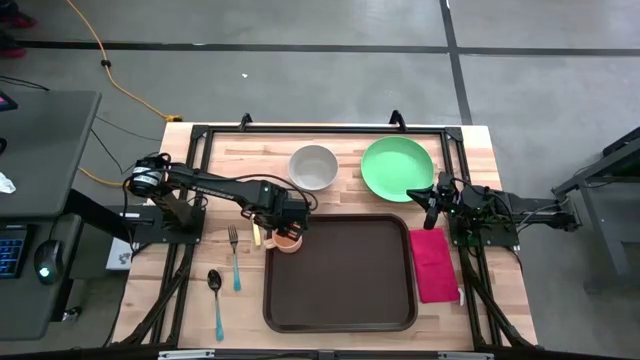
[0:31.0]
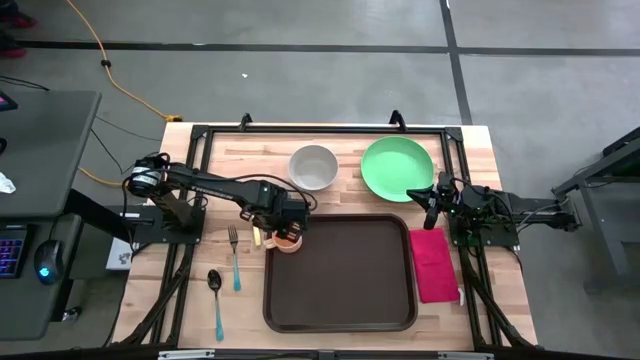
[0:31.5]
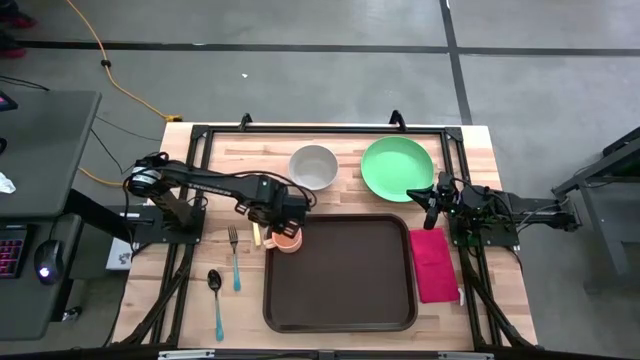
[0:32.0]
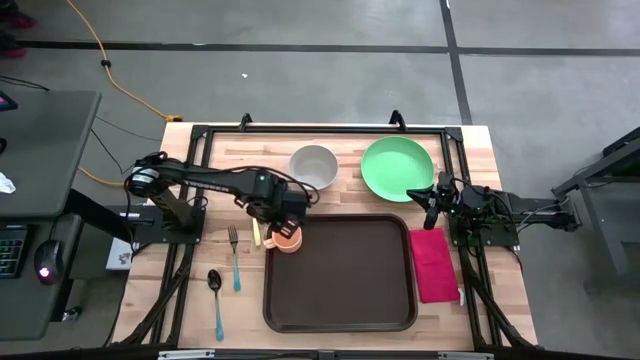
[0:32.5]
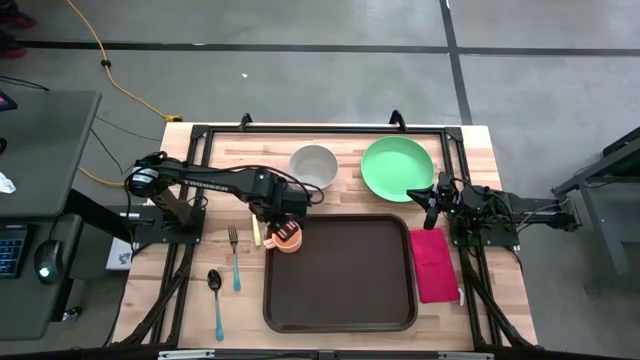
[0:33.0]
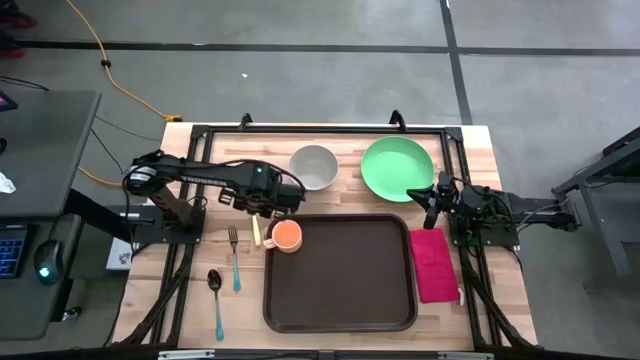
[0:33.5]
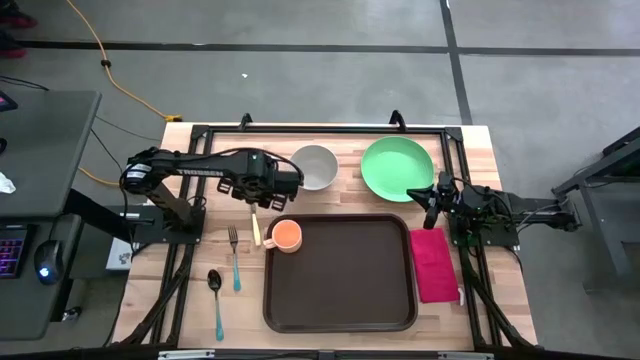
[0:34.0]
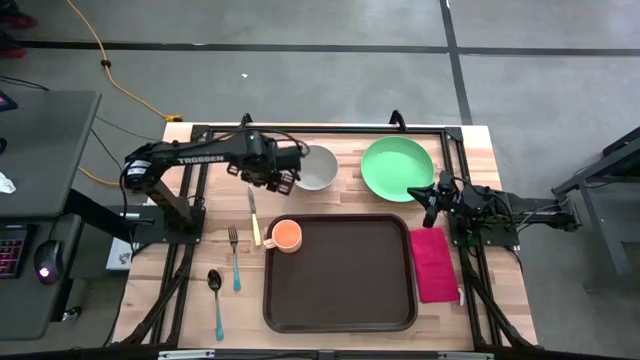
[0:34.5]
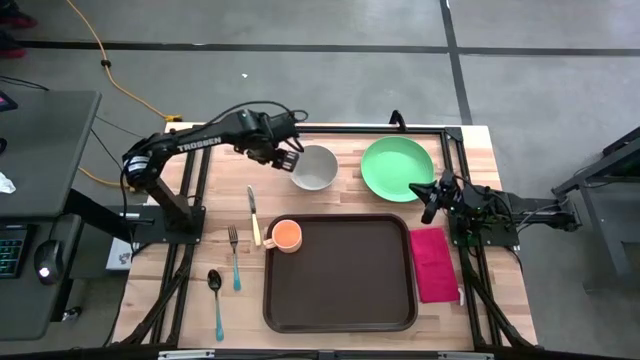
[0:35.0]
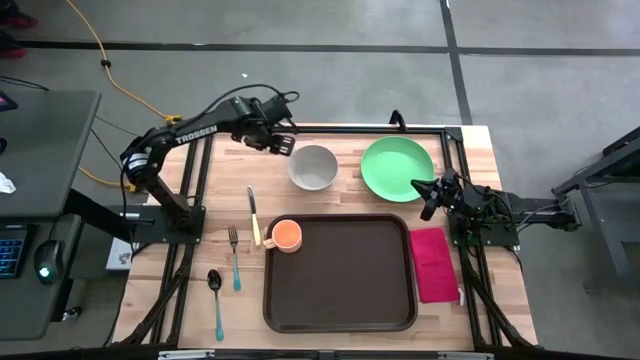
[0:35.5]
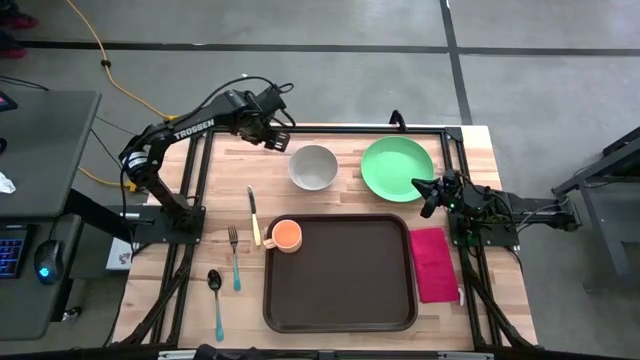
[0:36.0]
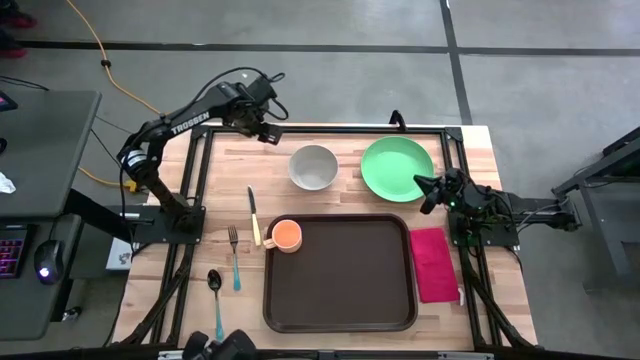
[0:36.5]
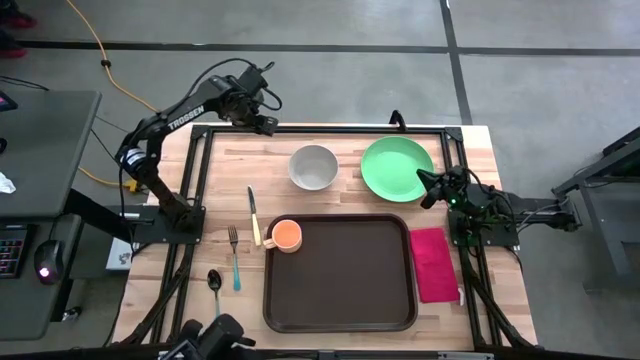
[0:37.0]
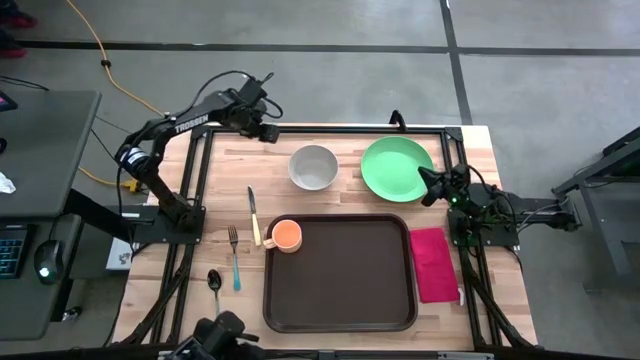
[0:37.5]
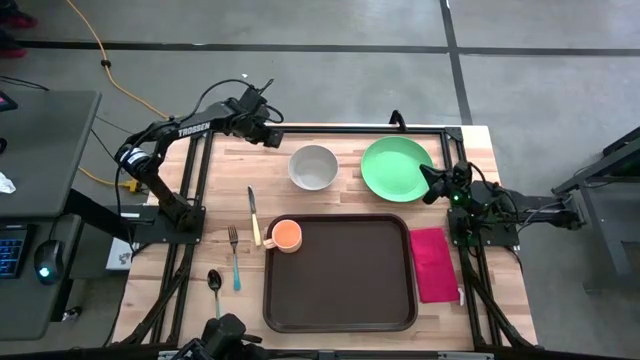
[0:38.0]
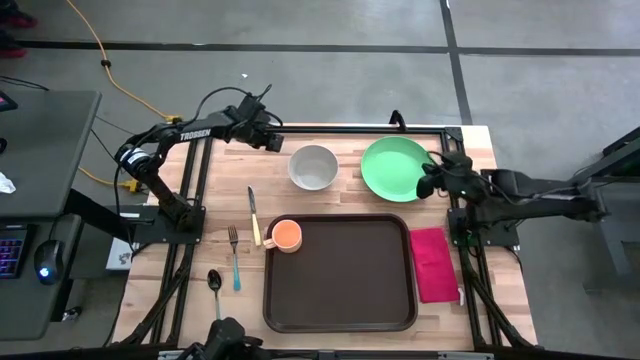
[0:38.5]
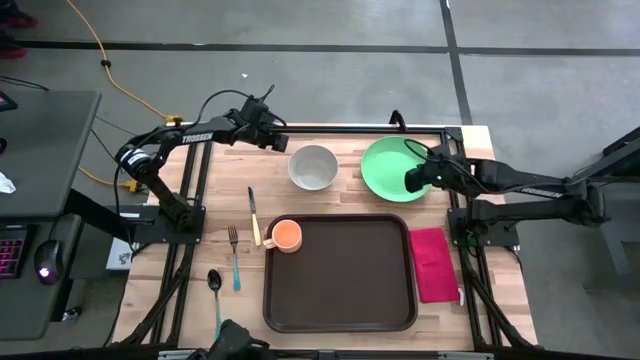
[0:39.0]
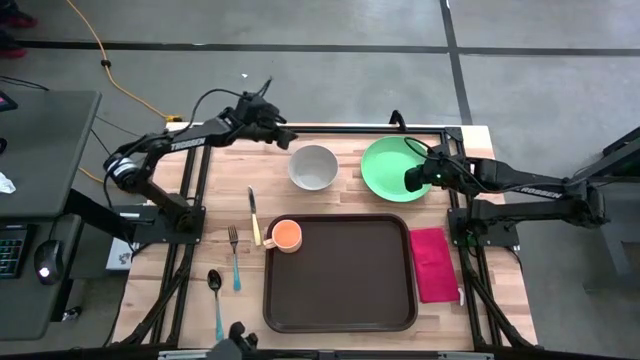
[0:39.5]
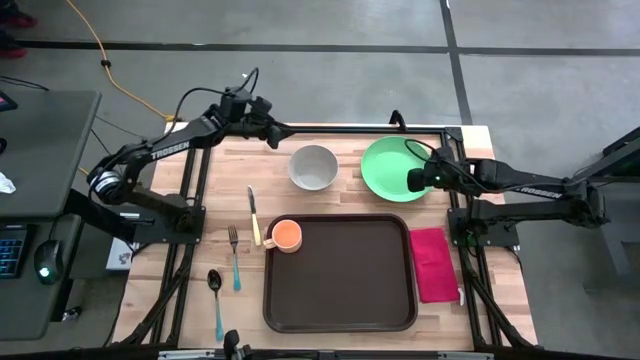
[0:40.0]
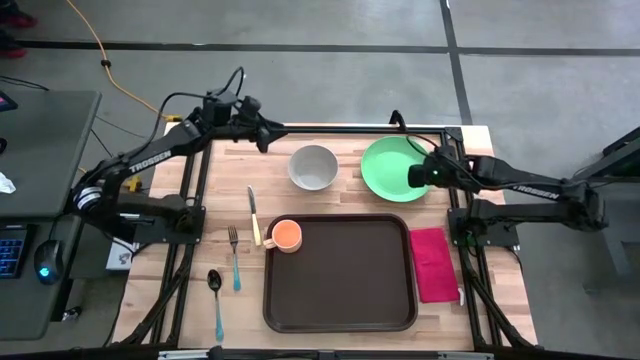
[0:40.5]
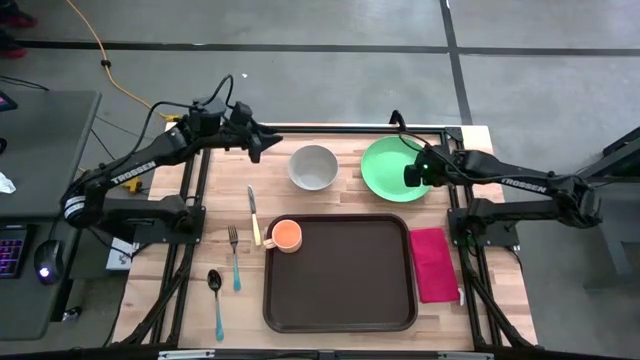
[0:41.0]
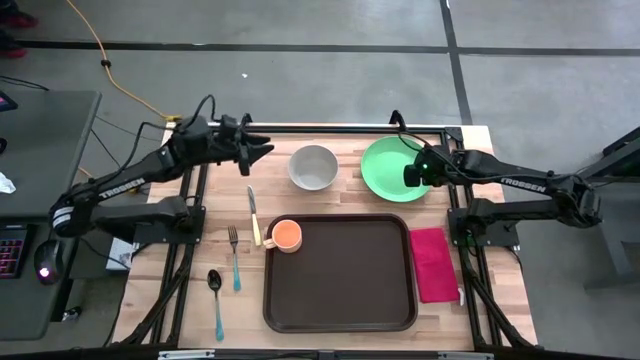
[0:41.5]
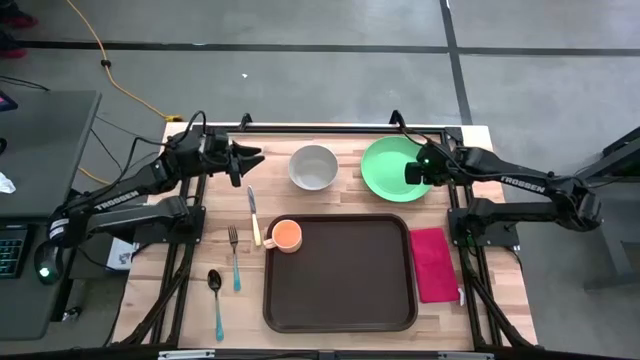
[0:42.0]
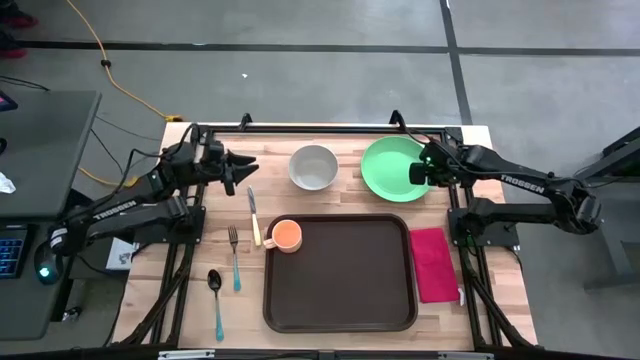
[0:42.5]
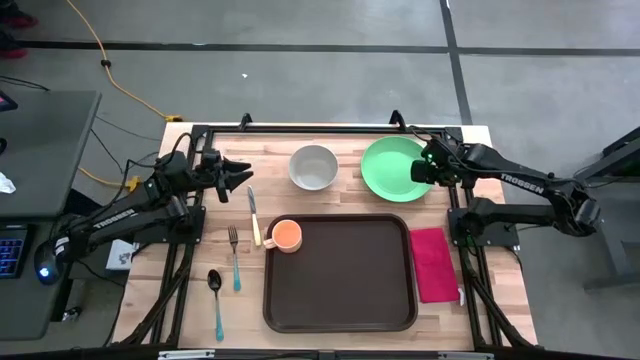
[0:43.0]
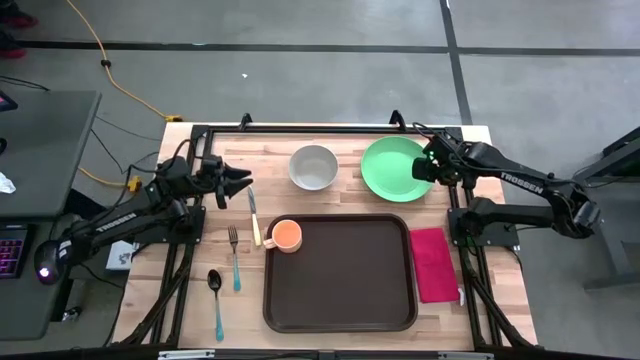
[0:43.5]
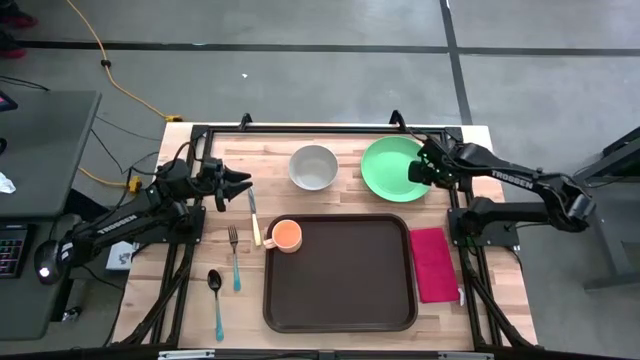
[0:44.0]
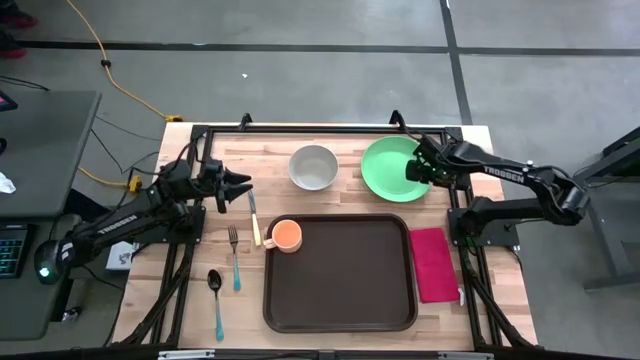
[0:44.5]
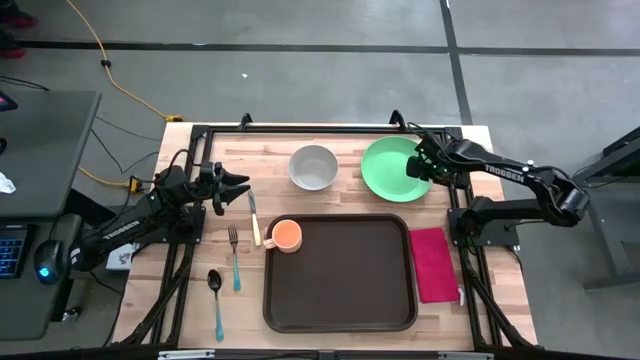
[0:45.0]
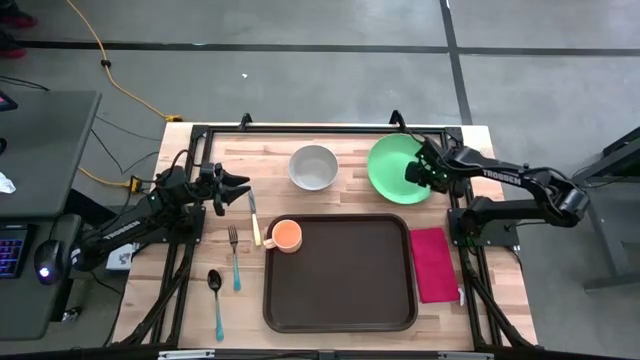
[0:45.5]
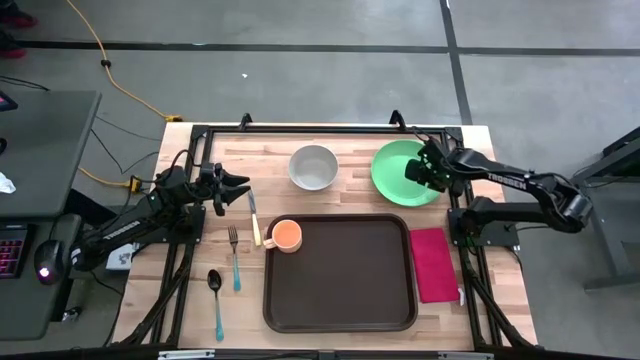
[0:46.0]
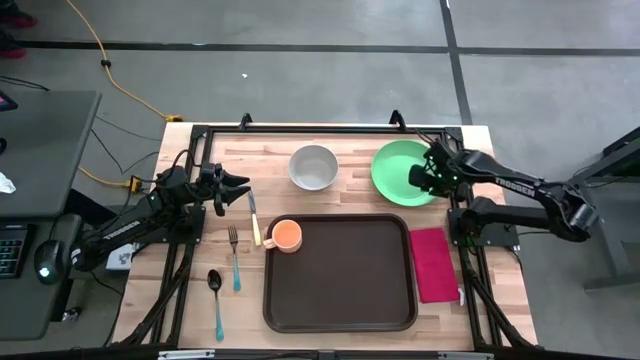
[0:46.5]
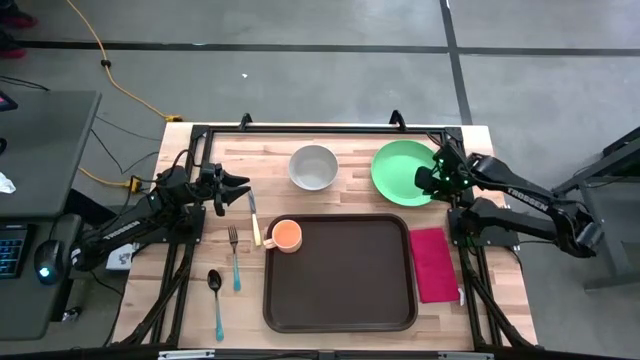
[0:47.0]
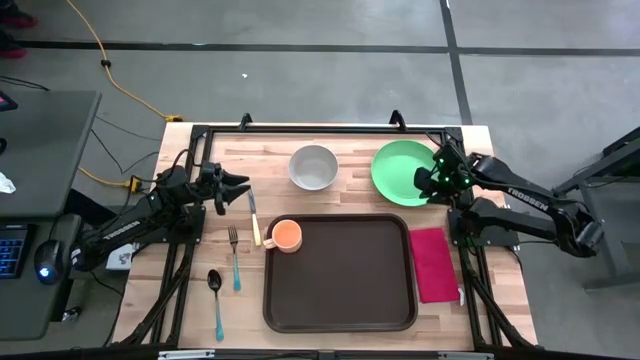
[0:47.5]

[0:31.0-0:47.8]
Task: Set up tray
Put the green plate on the black tray
